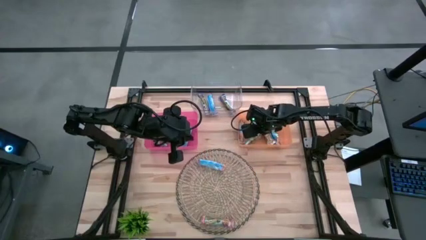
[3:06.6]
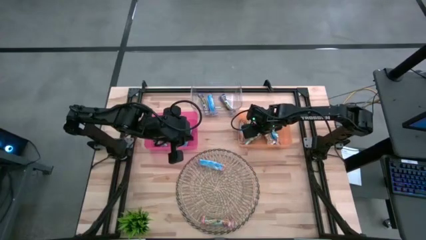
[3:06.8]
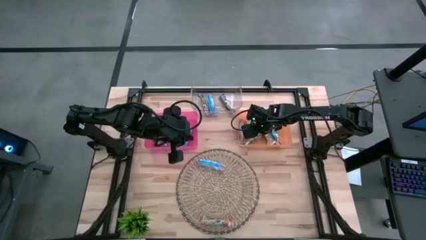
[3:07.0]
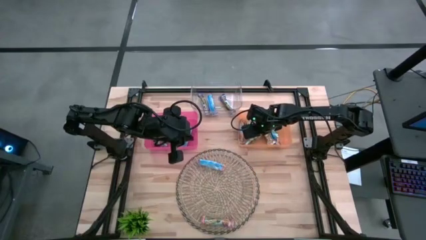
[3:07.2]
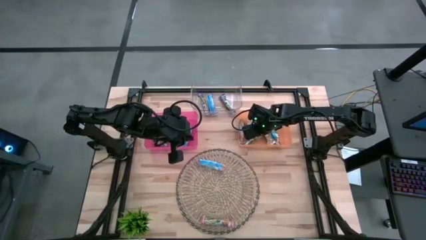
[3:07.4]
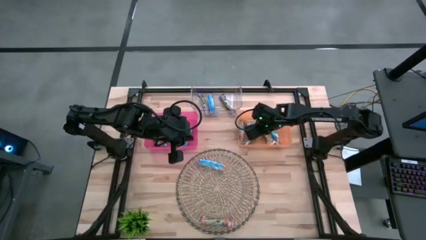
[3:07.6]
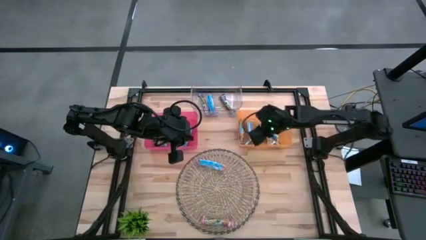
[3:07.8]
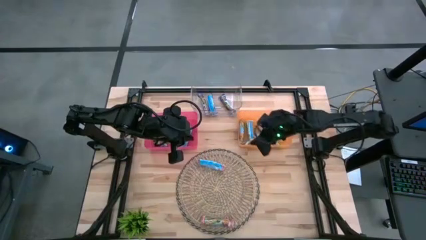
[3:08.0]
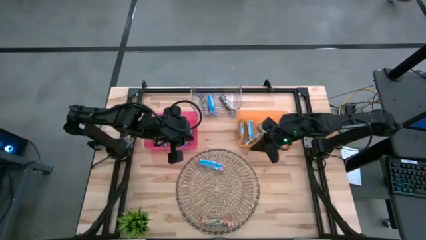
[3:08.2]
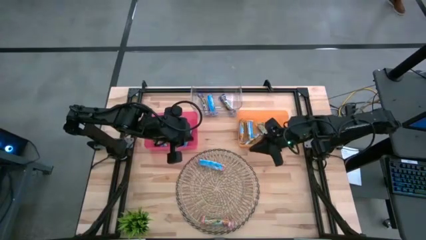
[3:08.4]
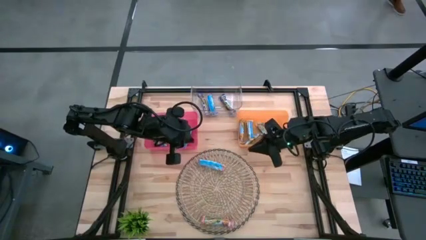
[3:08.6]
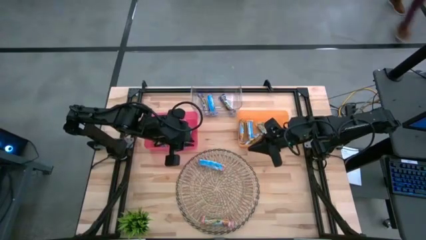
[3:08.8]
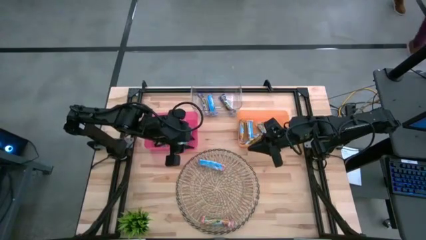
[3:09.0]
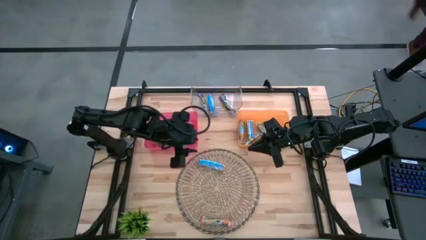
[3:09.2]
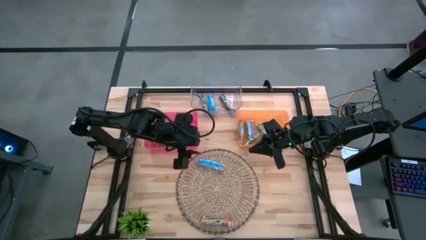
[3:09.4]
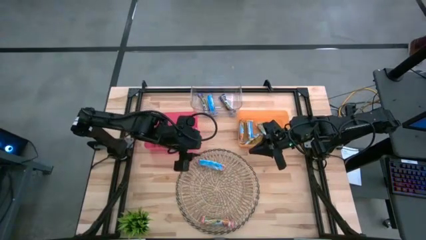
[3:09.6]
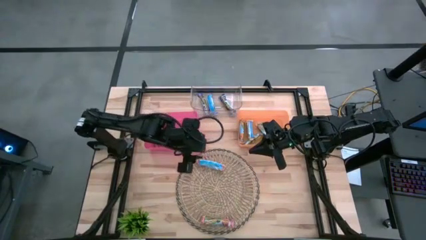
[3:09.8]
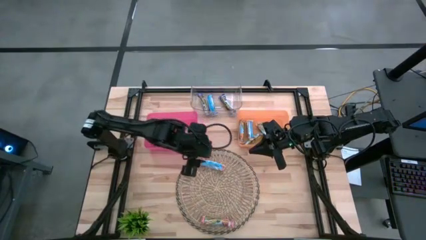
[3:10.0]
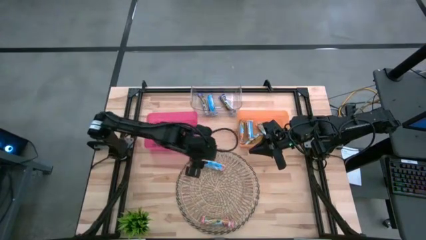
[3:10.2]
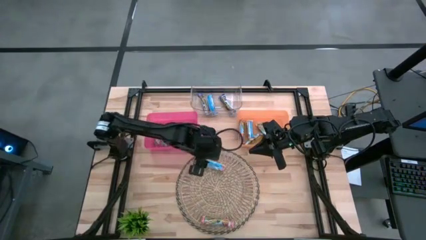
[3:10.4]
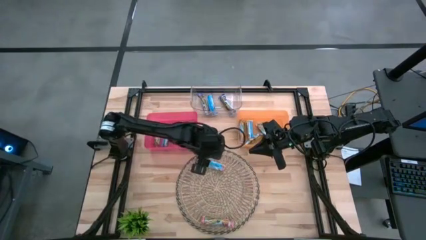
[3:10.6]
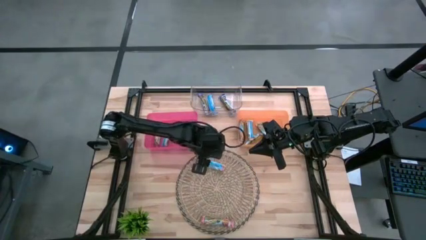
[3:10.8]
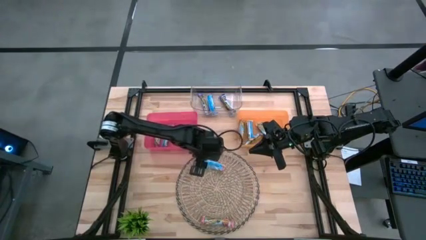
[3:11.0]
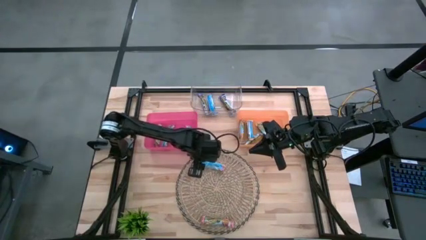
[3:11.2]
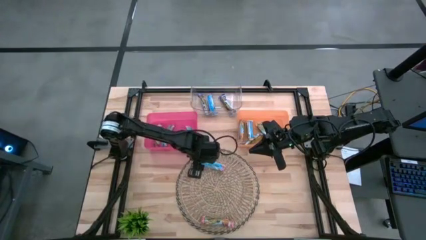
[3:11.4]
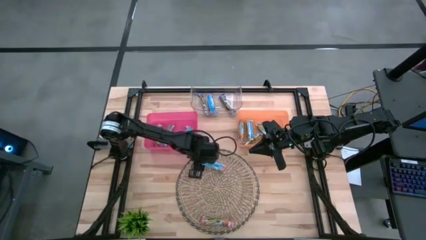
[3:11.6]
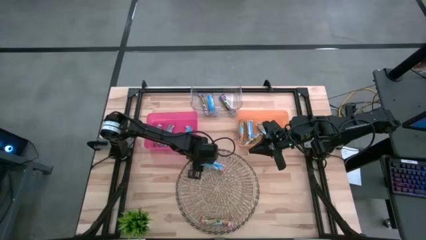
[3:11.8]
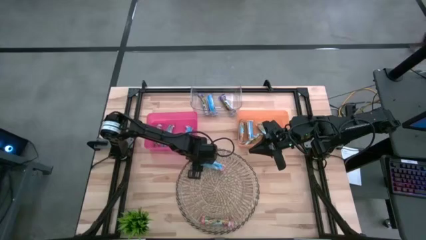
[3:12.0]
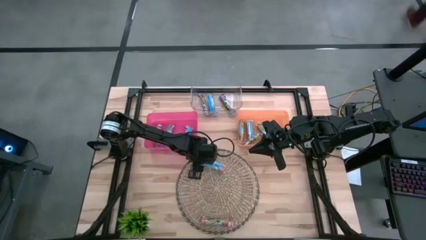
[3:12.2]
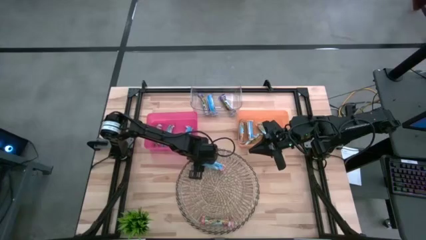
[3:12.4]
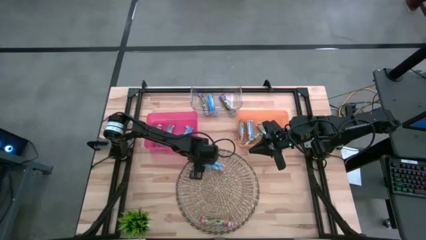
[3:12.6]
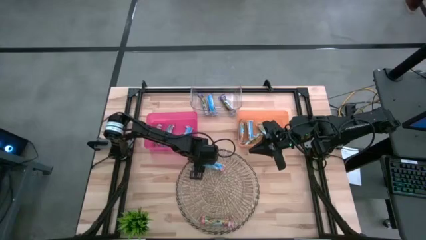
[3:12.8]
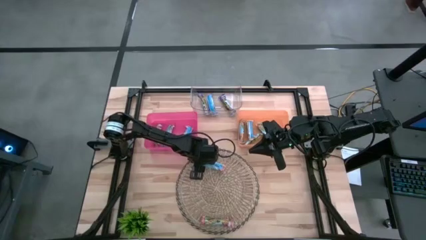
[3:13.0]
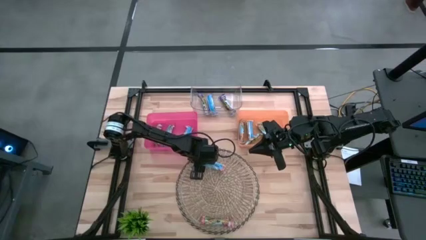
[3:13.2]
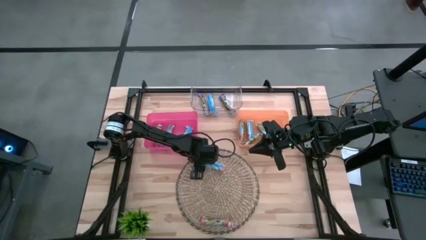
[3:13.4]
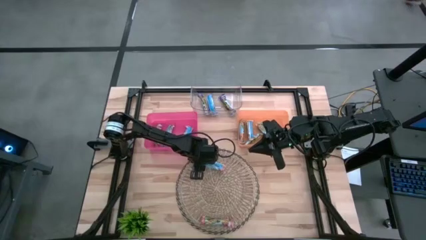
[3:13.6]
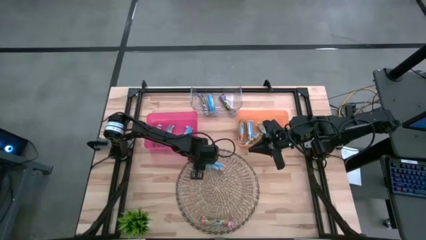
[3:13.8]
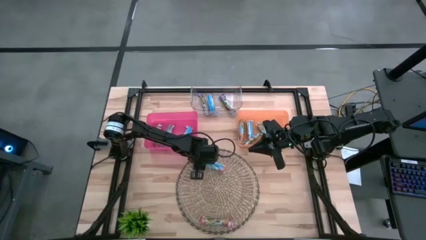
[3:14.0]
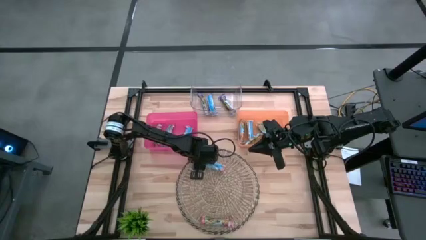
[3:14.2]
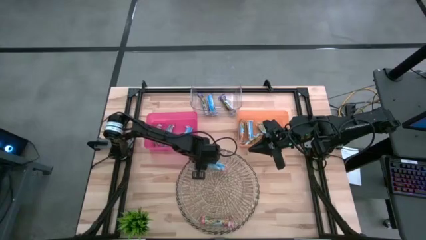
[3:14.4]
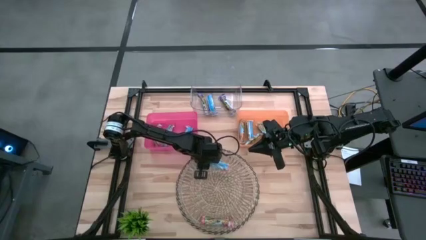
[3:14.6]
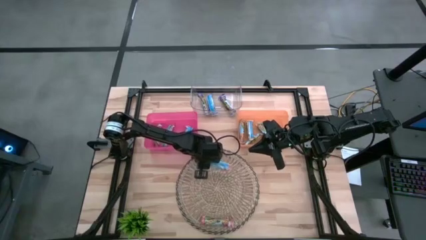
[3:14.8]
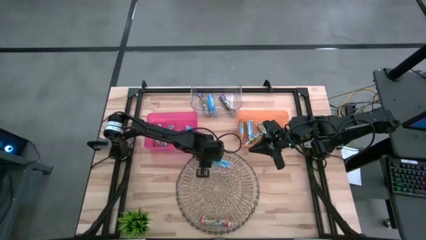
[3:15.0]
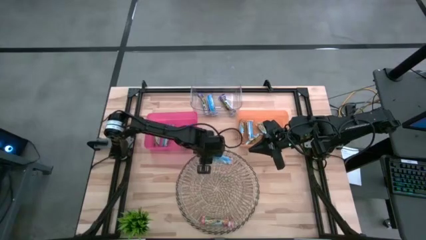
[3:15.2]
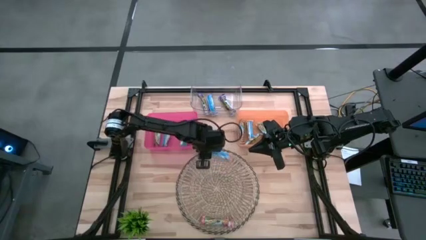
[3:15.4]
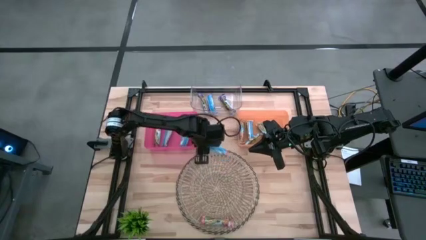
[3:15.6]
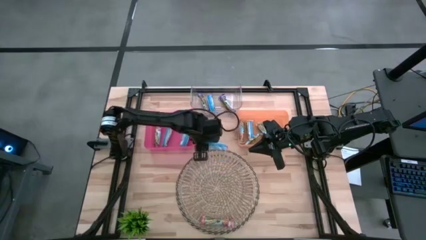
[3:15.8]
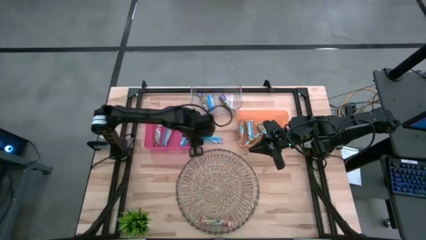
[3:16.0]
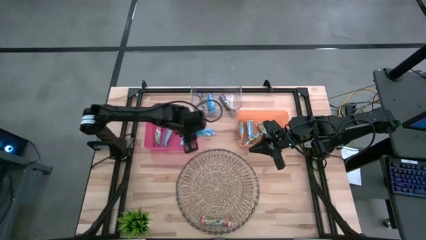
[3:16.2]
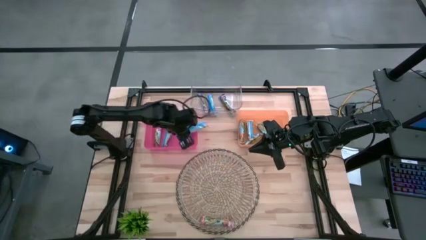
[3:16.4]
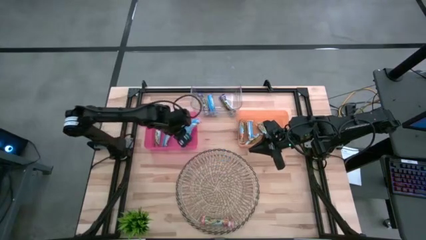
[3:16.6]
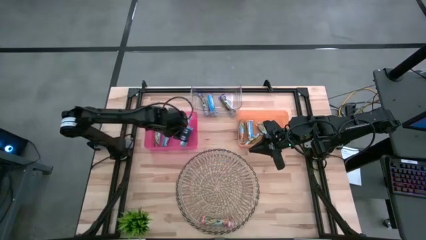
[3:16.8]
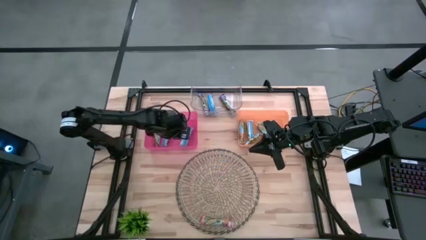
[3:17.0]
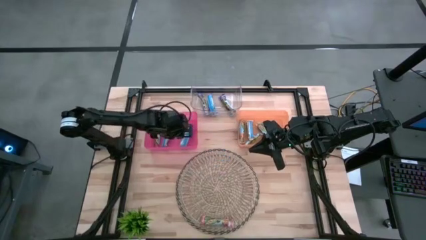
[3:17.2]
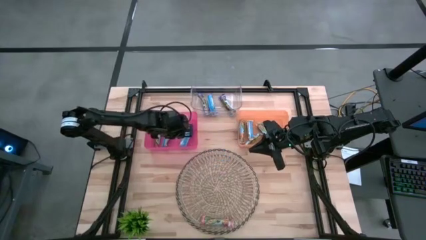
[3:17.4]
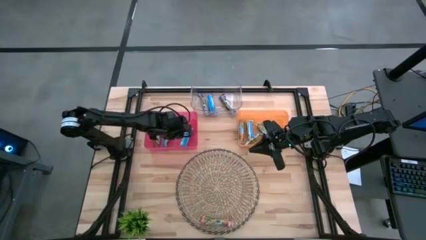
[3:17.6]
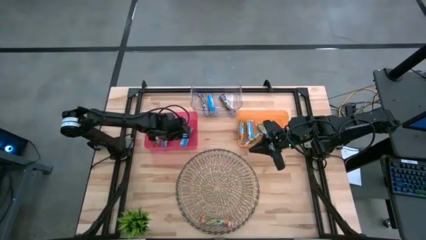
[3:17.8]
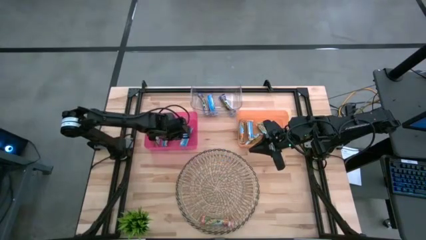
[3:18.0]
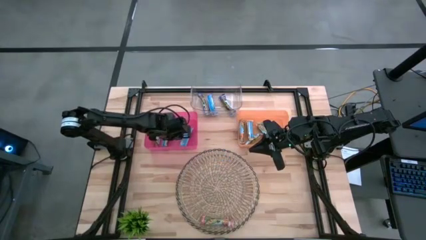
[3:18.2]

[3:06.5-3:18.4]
Task: Pick and place Granola Bars by type
Put the red granola bar into the pink bin

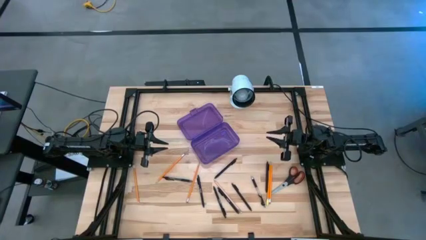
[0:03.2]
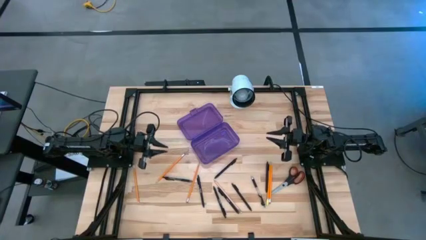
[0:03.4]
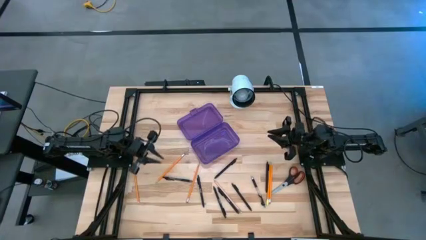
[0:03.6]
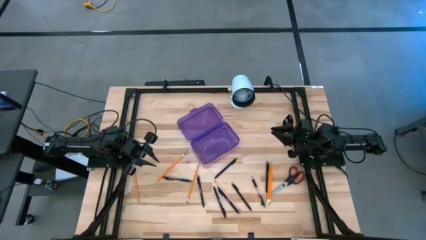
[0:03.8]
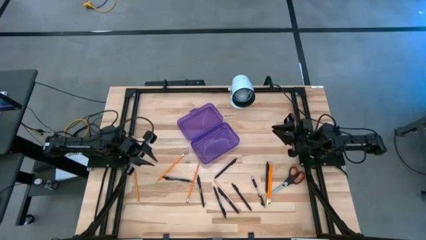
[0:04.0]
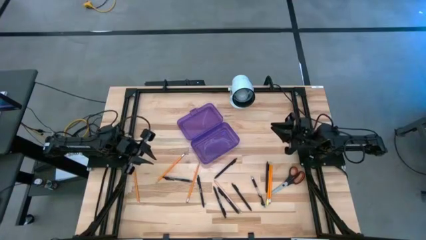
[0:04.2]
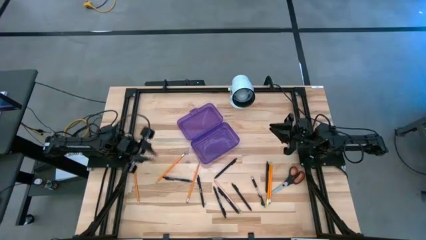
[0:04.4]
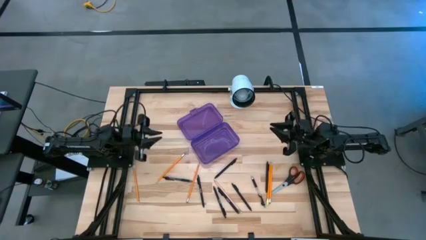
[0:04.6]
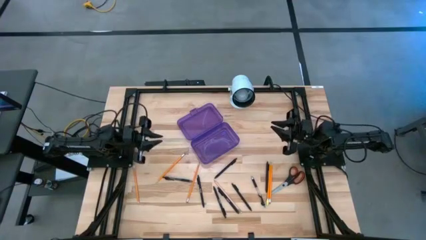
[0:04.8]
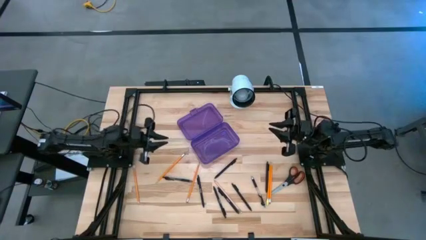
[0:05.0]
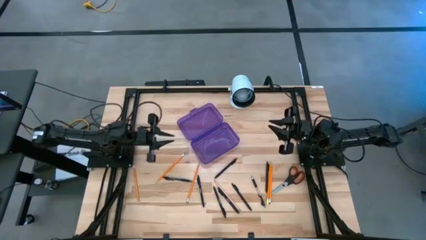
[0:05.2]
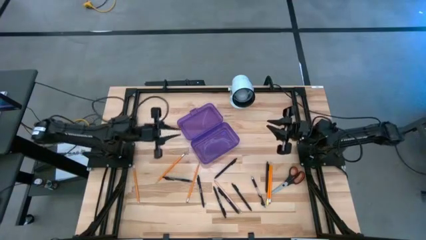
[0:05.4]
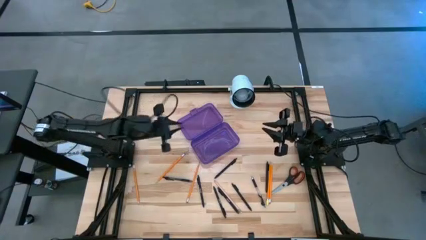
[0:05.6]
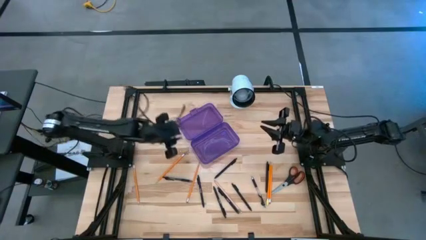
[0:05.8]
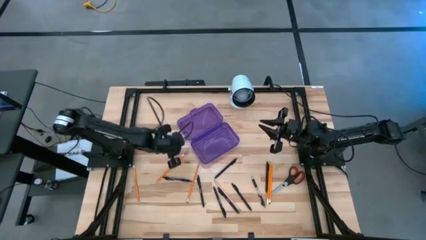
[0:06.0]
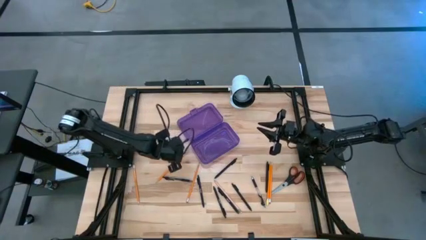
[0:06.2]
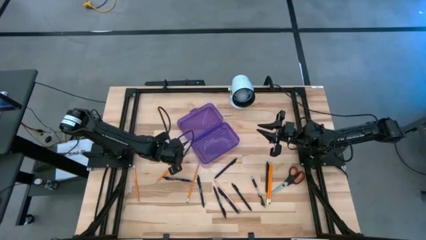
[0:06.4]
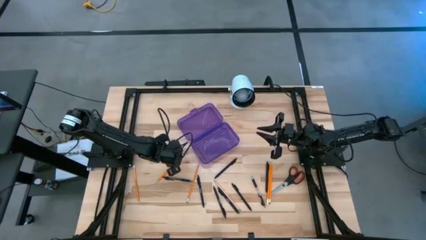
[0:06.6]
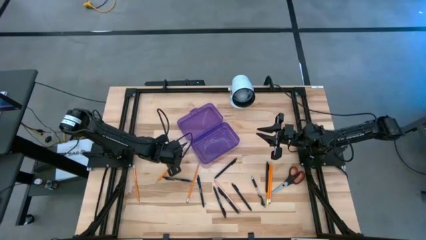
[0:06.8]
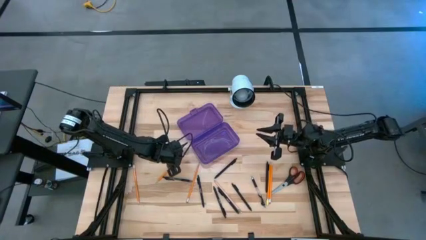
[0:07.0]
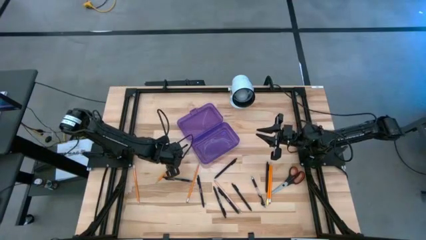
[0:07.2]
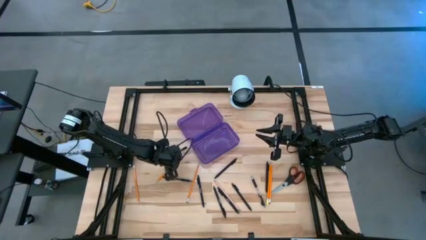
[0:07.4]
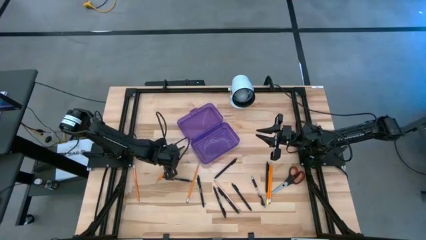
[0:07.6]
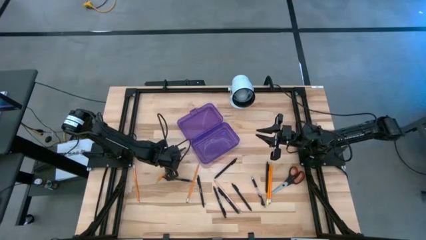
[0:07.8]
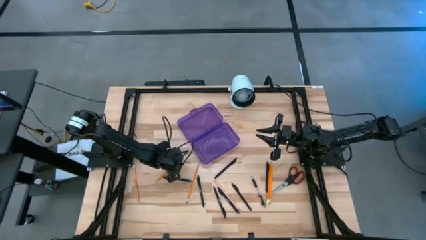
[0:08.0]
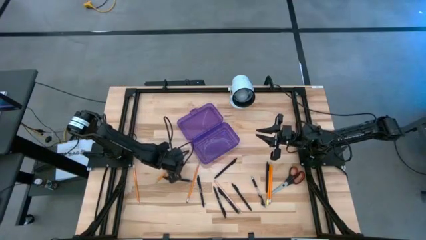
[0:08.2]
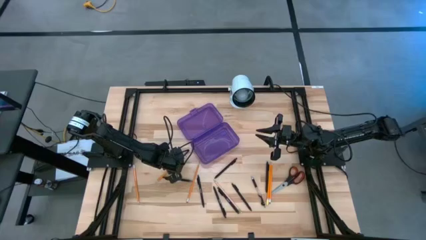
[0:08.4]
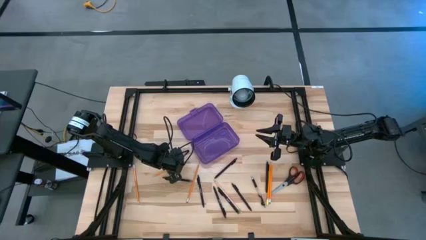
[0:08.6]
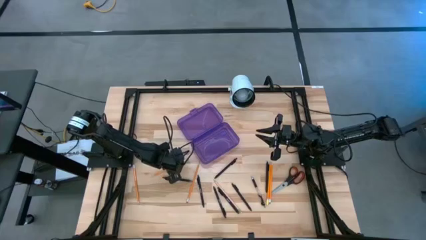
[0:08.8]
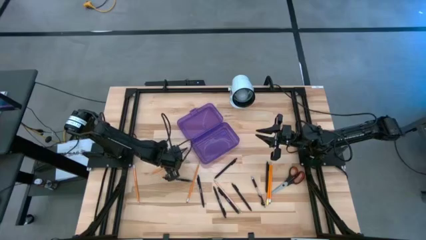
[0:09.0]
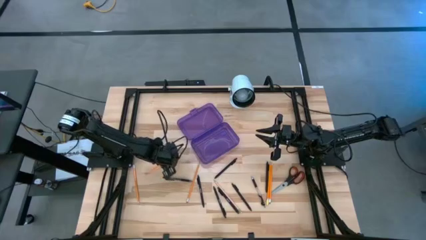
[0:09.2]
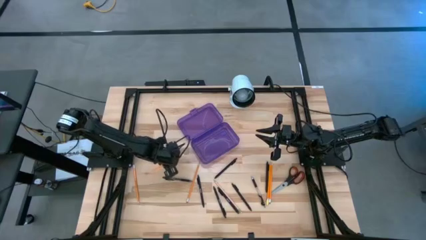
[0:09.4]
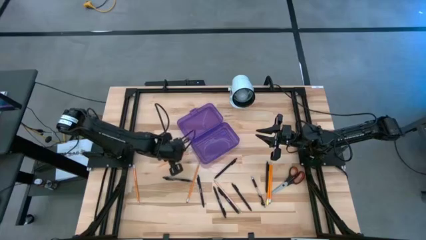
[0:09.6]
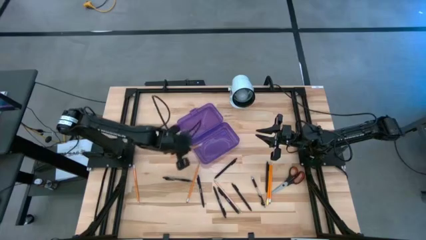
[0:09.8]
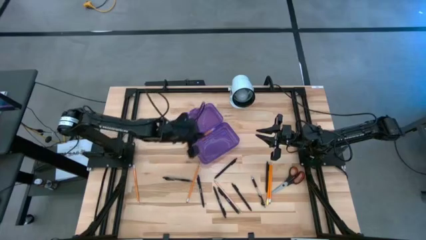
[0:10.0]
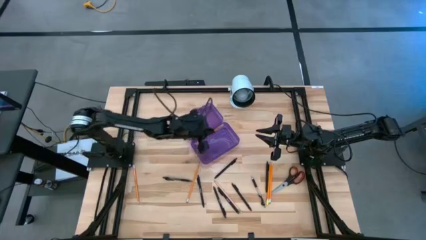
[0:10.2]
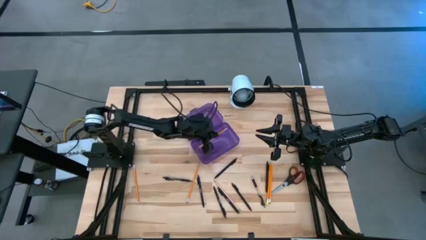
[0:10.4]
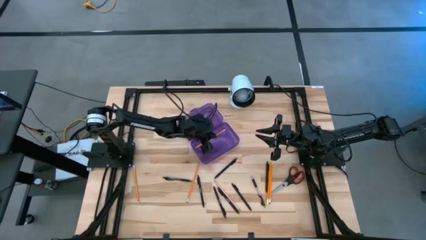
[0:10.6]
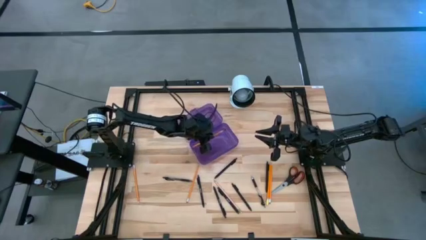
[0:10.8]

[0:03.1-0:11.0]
Task: Pick & place school supplies into a supply box
Put the orange pencil into the purple supply box
